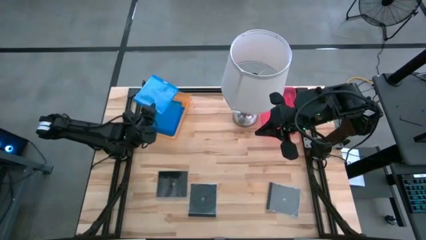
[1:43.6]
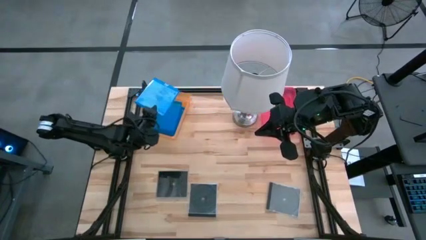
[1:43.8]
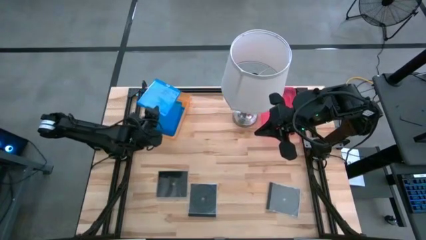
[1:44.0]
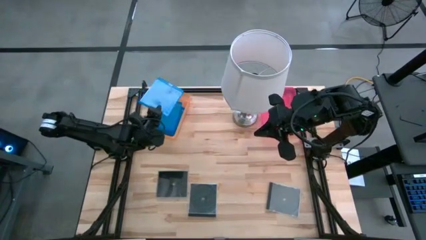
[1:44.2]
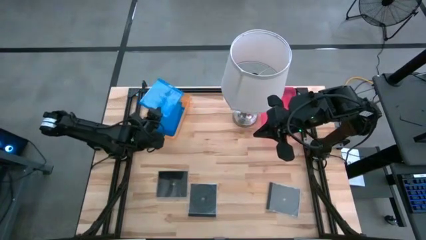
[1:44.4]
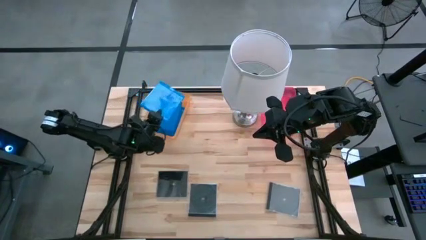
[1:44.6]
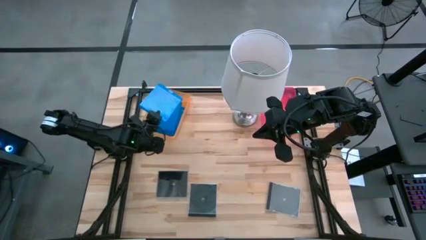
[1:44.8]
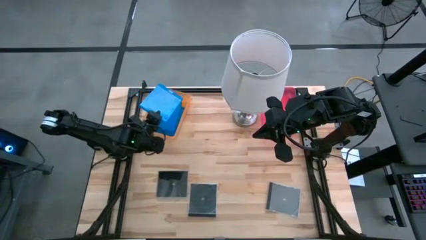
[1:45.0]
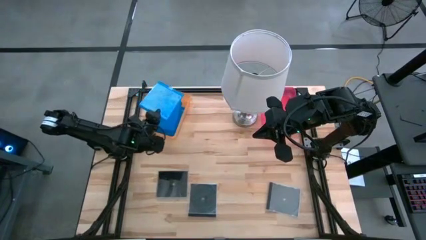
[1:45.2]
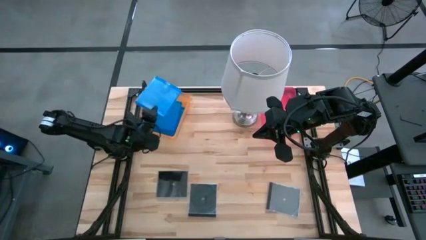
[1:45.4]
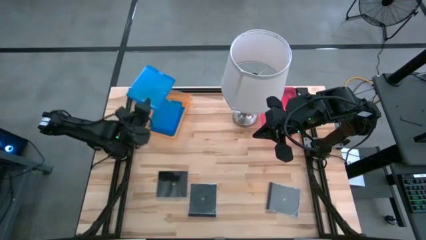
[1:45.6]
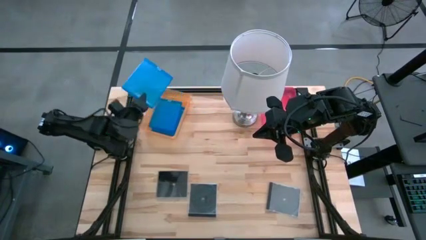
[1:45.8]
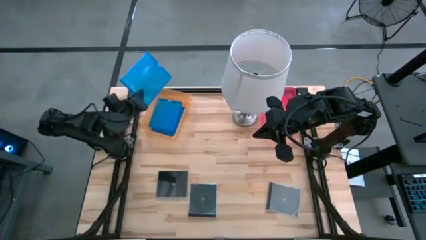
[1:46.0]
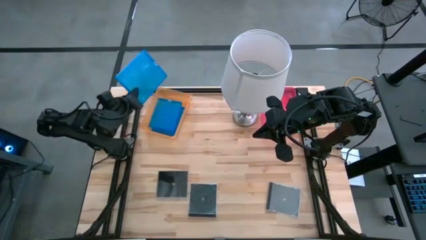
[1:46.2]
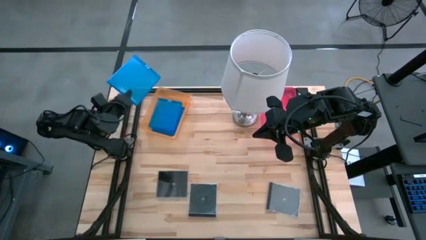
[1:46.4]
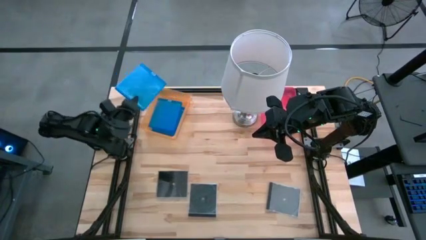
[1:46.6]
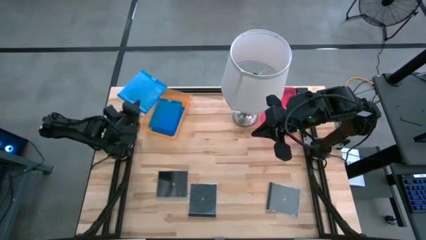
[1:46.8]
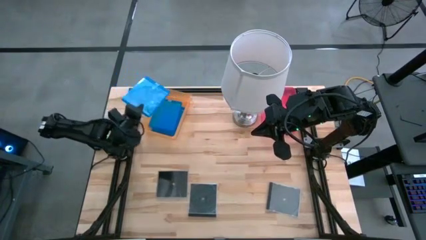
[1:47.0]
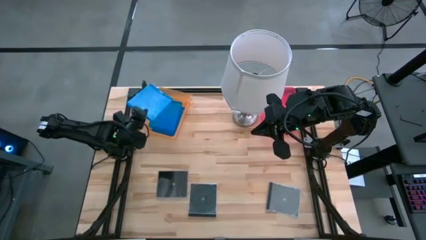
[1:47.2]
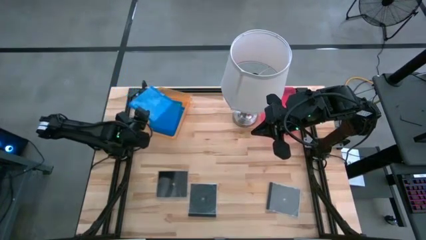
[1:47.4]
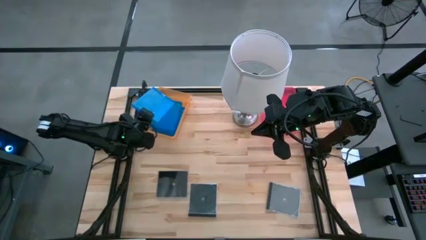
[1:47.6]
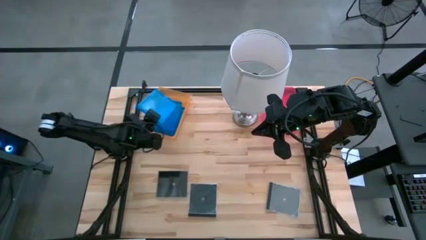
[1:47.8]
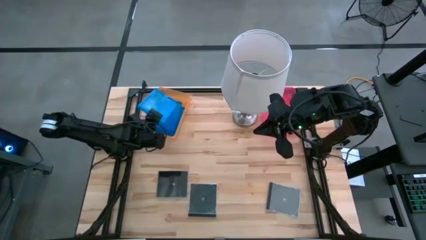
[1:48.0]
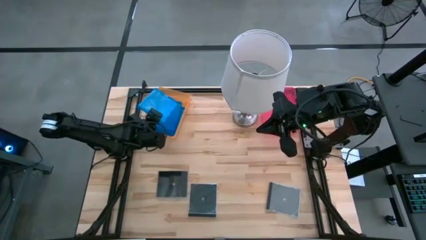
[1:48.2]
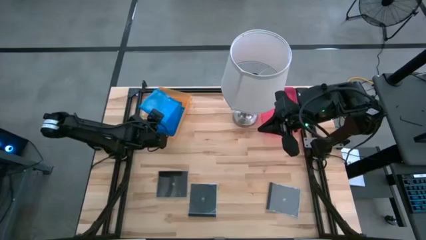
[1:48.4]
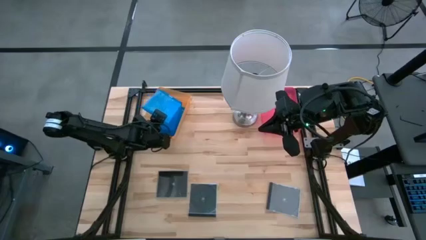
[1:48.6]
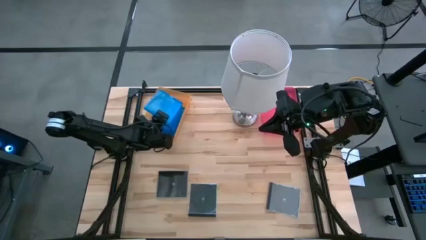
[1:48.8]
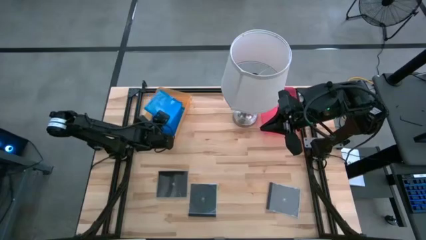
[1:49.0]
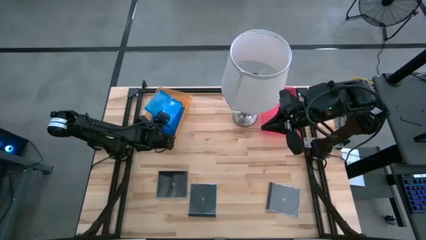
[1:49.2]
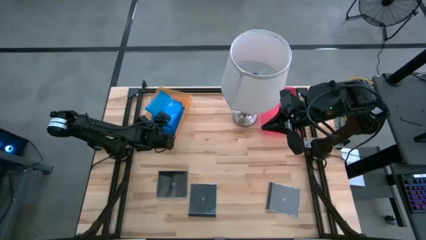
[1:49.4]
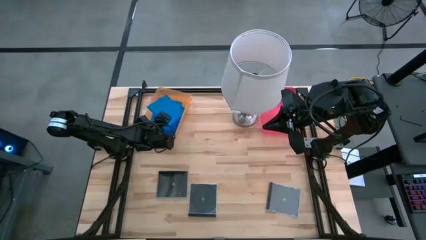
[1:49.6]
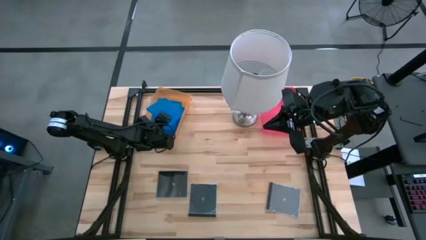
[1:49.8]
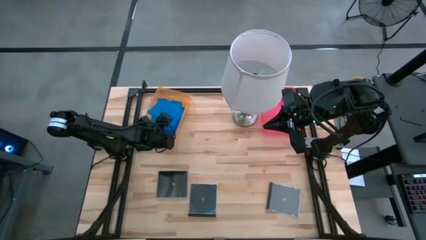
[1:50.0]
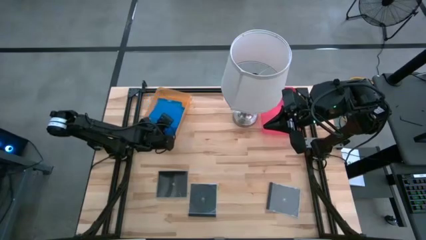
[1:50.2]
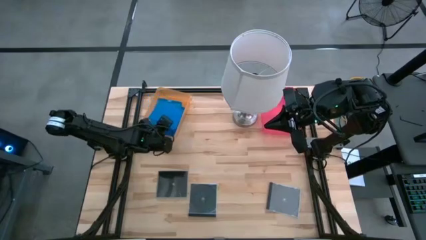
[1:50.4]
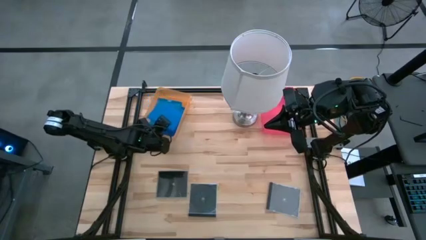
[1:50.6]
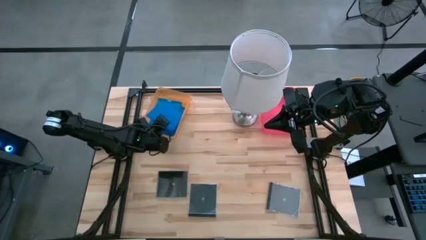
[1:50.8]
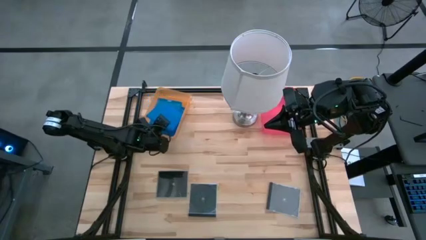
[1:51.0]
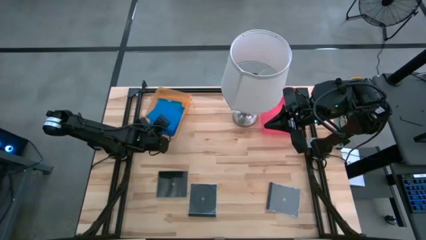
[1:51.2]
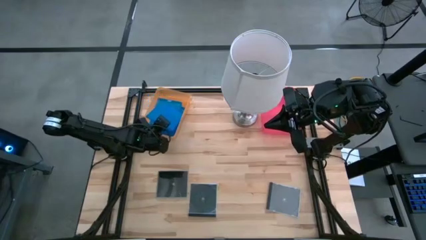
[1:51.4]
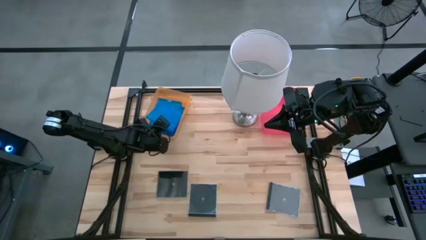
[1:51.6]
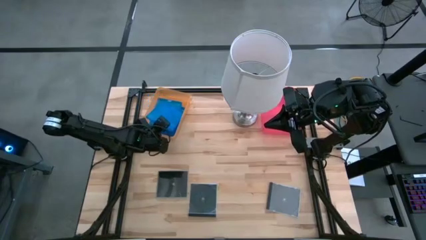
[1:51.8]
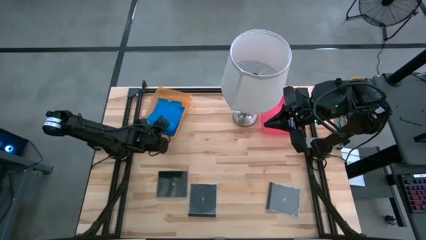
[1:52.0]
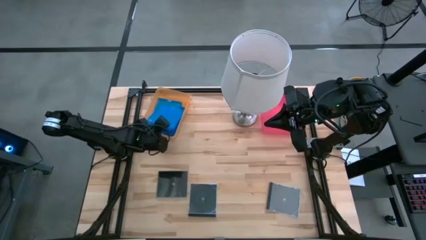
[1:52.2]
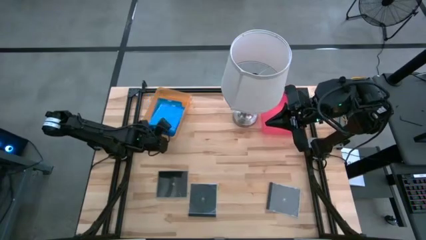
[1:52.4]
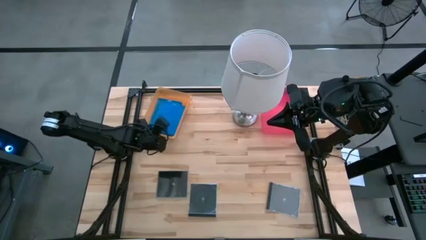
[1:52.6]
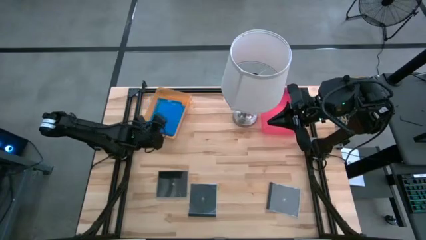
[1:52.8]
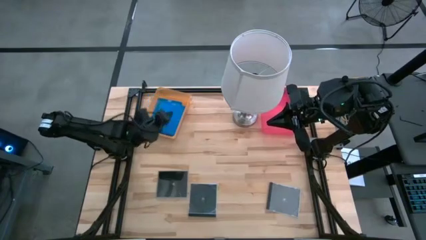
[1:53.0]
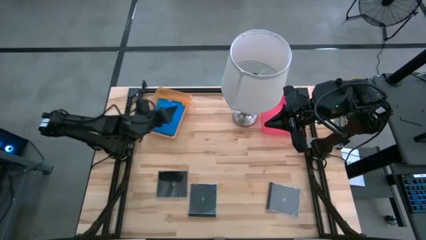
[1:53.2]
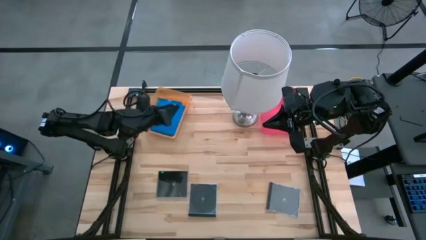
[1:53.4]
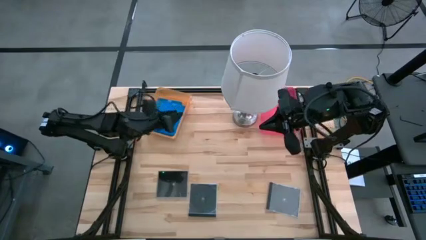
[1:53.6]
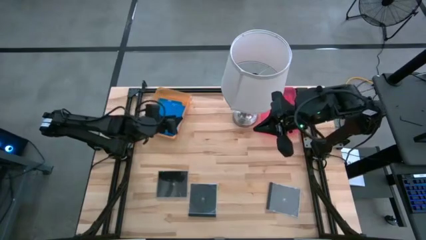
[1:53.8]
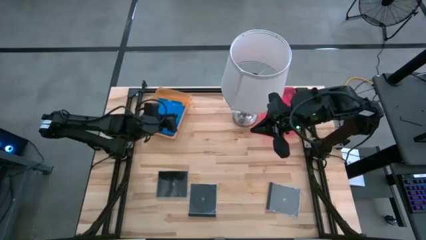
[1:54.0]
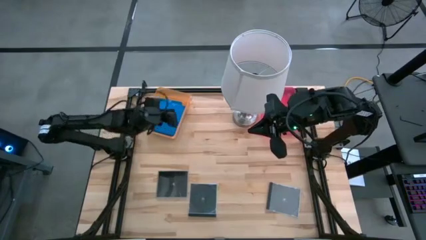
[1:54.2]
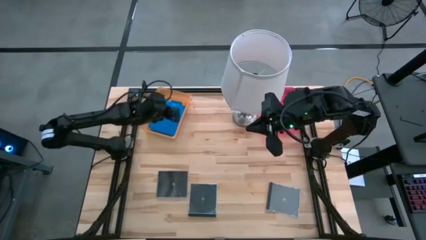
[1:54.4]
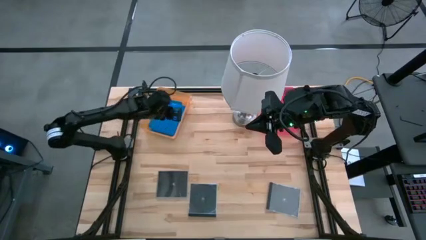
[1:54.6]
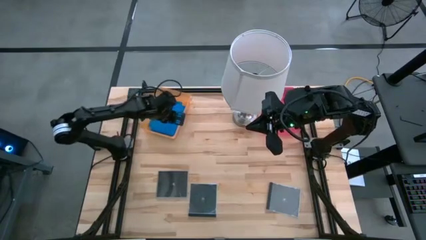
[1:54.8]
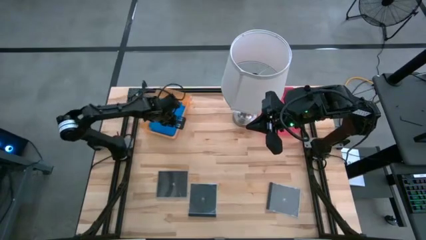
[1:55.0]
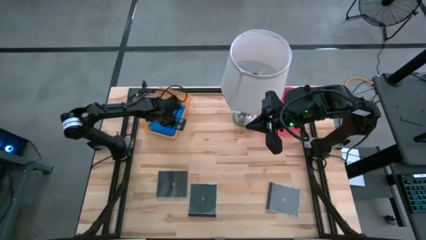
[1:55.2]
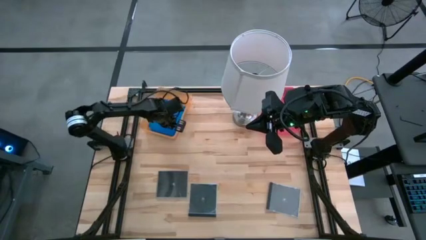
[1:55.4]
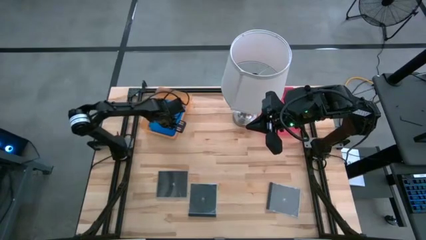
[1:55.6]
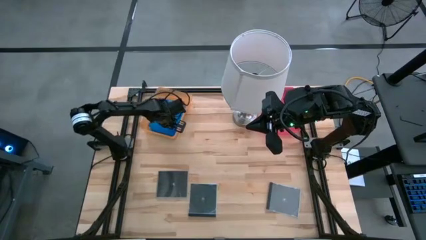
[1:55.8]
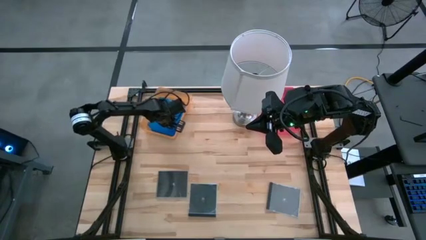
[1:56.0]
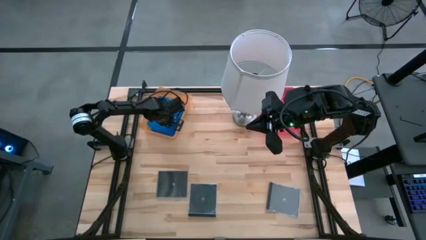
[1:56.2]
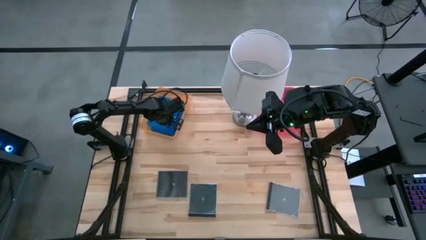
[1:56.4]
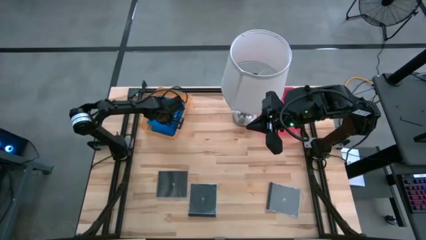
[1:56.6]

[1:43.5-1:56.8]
Task: Pick & place jewel cases by type
Put the blue cd case into the orange bin
